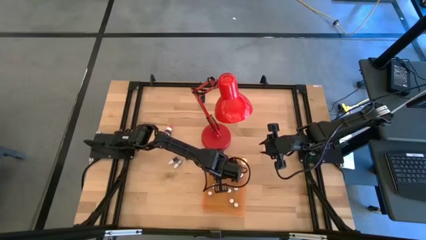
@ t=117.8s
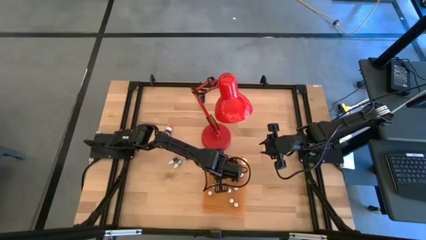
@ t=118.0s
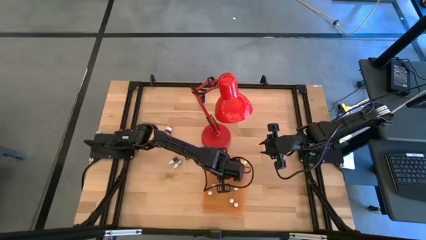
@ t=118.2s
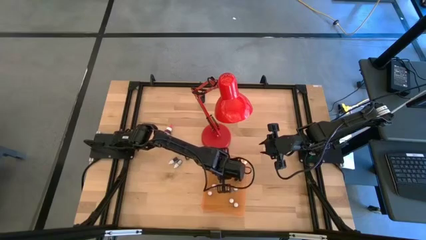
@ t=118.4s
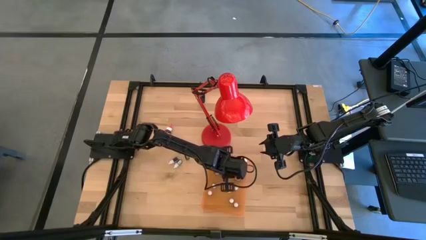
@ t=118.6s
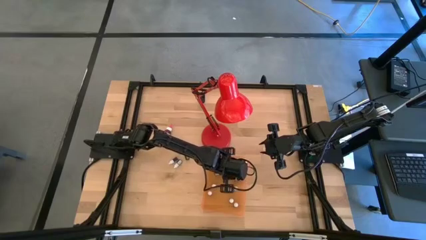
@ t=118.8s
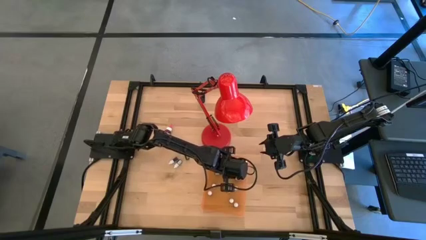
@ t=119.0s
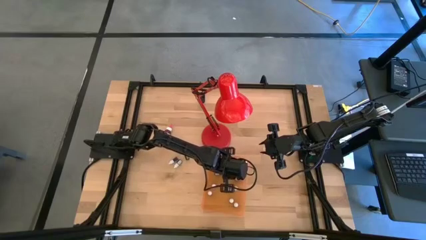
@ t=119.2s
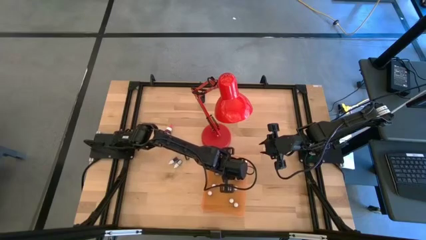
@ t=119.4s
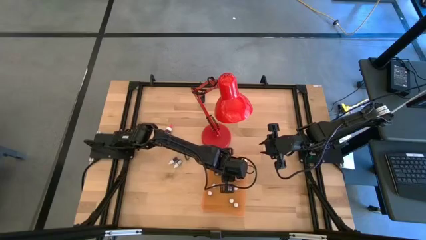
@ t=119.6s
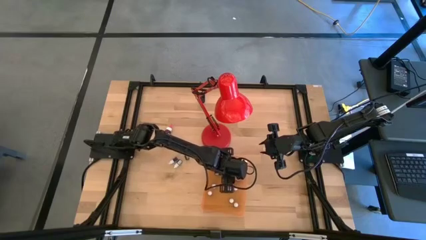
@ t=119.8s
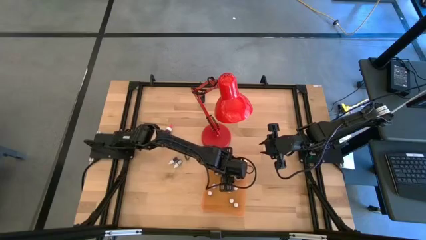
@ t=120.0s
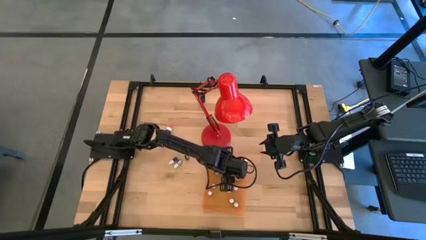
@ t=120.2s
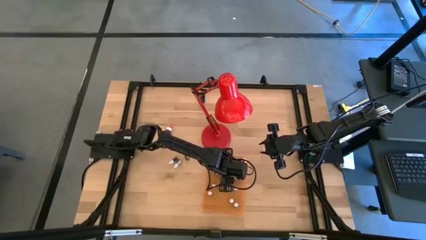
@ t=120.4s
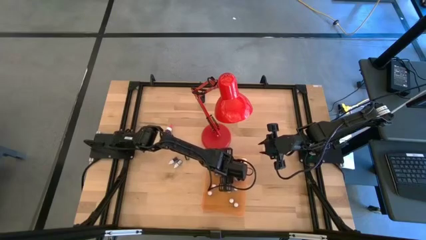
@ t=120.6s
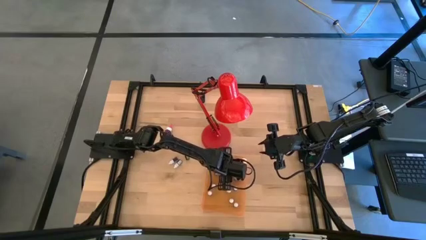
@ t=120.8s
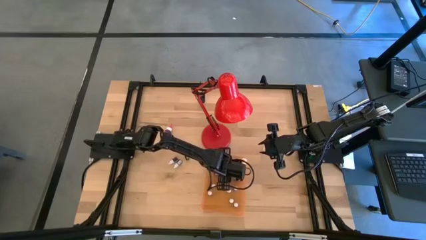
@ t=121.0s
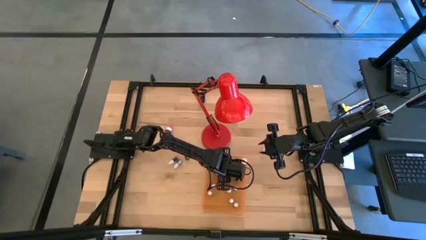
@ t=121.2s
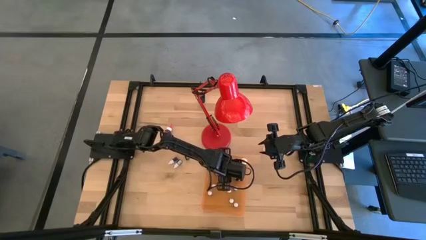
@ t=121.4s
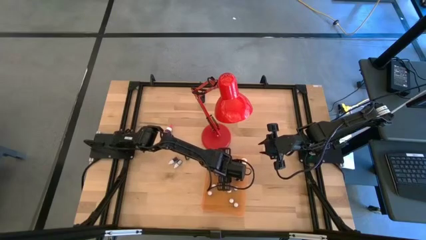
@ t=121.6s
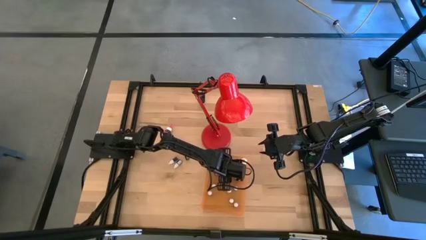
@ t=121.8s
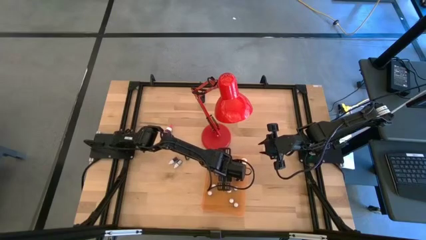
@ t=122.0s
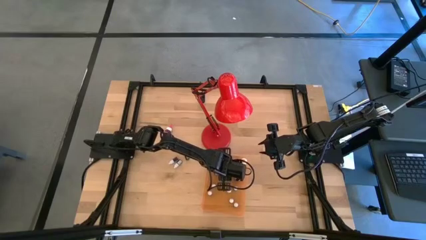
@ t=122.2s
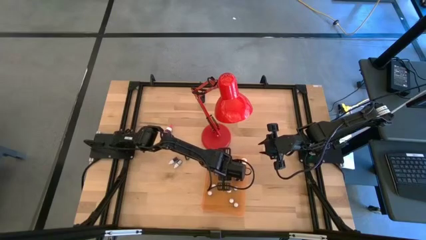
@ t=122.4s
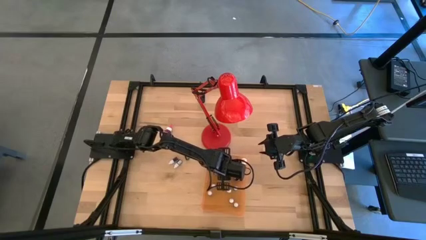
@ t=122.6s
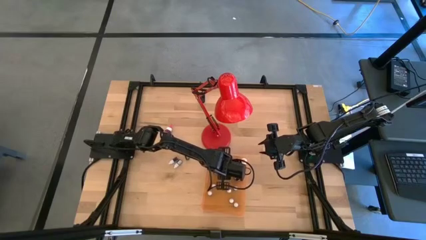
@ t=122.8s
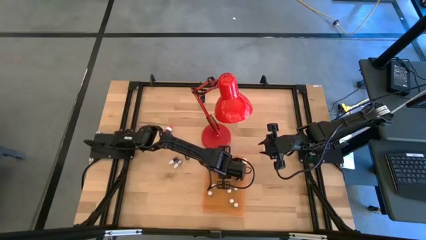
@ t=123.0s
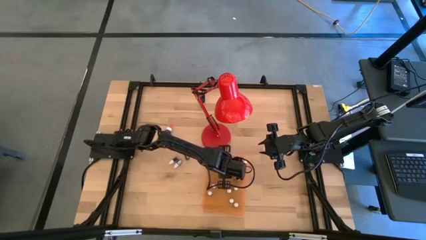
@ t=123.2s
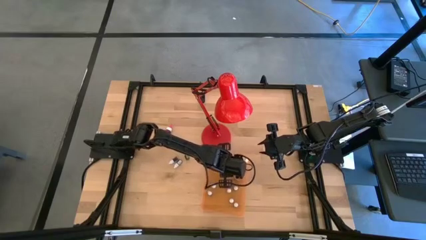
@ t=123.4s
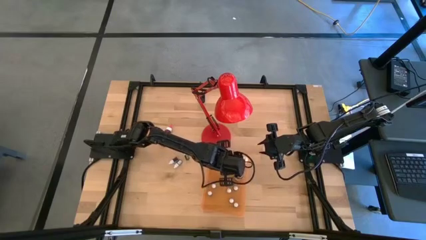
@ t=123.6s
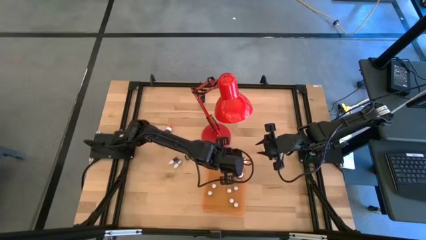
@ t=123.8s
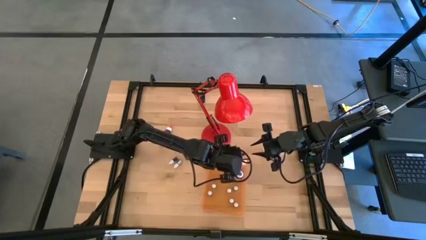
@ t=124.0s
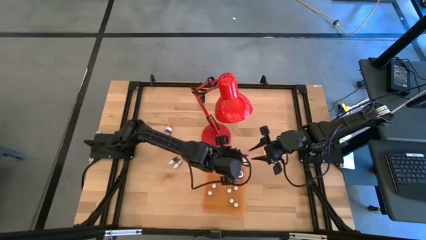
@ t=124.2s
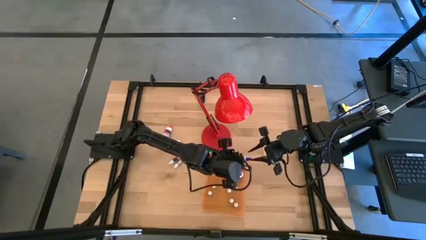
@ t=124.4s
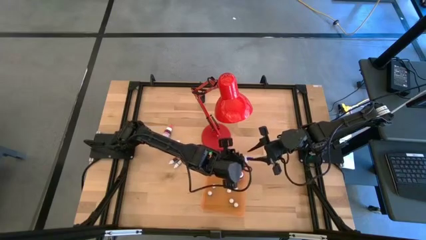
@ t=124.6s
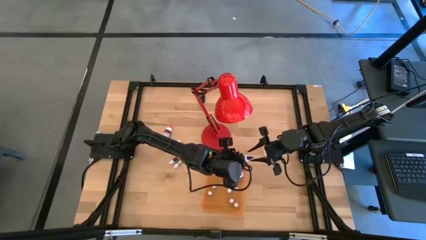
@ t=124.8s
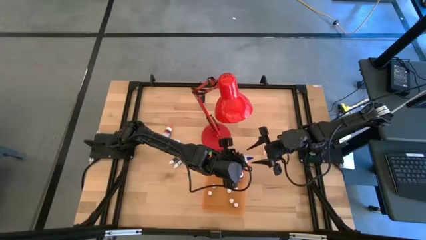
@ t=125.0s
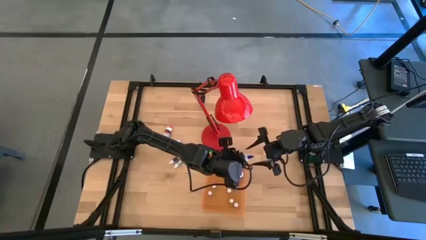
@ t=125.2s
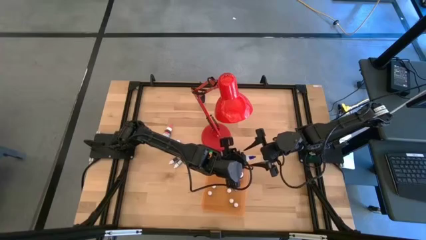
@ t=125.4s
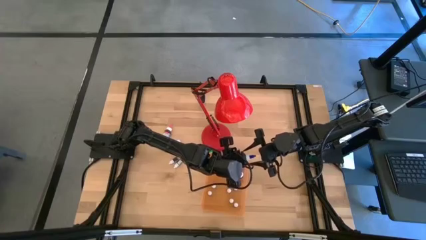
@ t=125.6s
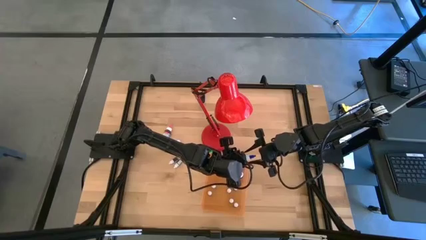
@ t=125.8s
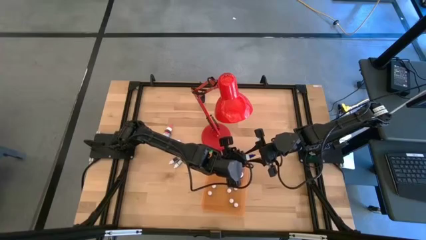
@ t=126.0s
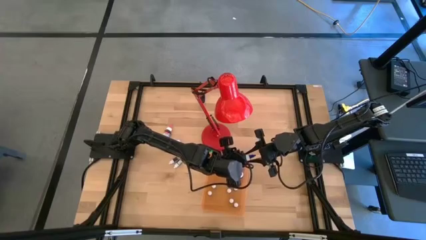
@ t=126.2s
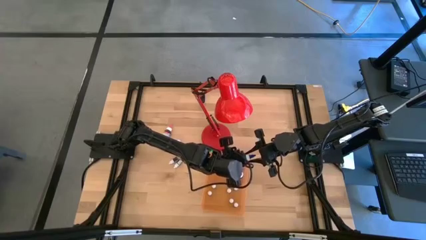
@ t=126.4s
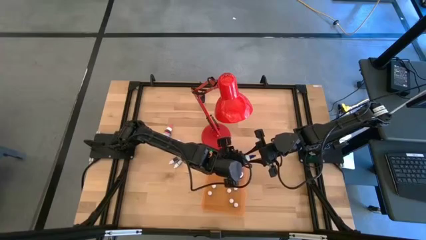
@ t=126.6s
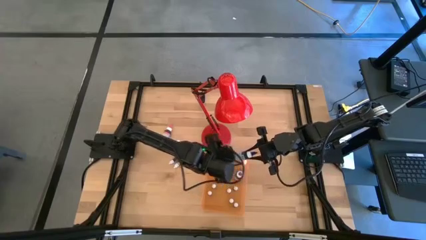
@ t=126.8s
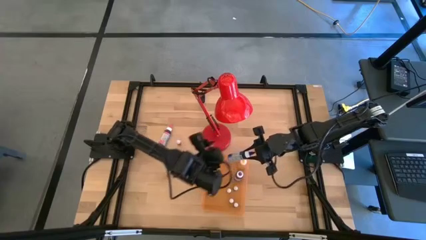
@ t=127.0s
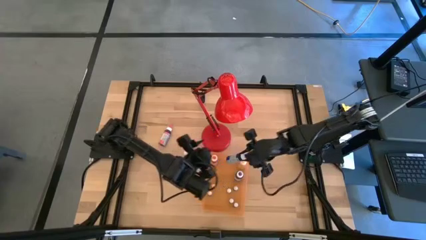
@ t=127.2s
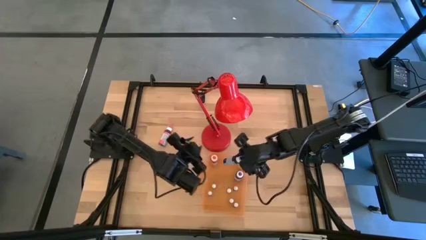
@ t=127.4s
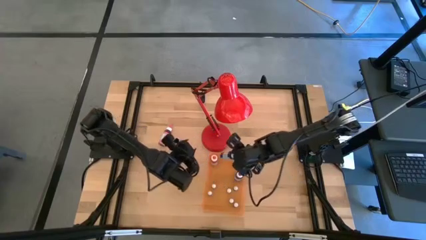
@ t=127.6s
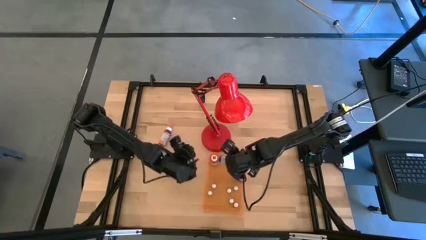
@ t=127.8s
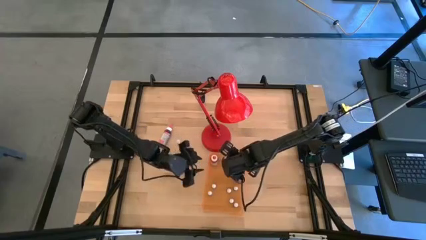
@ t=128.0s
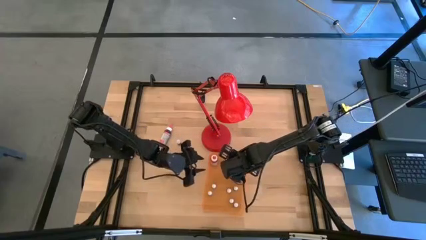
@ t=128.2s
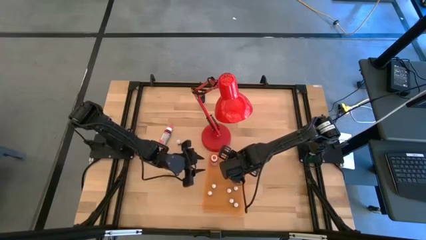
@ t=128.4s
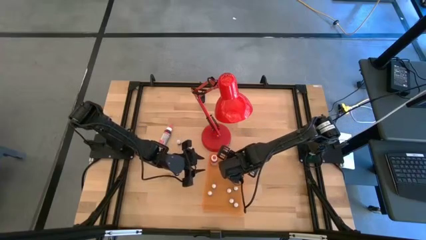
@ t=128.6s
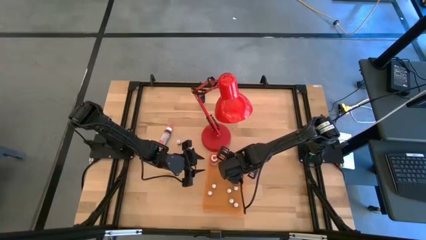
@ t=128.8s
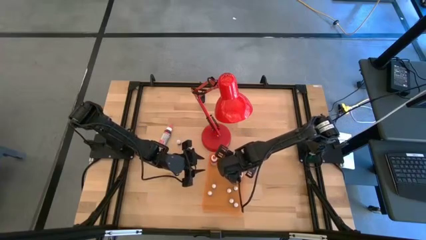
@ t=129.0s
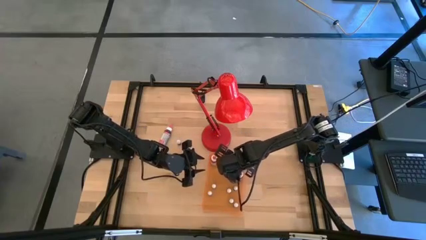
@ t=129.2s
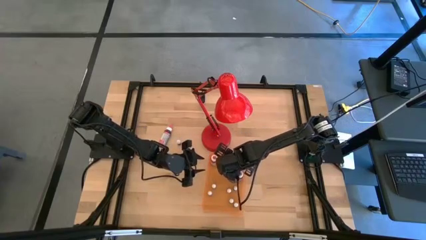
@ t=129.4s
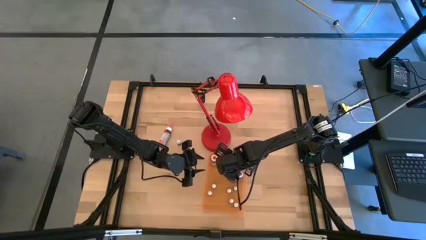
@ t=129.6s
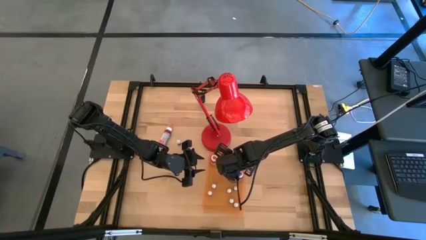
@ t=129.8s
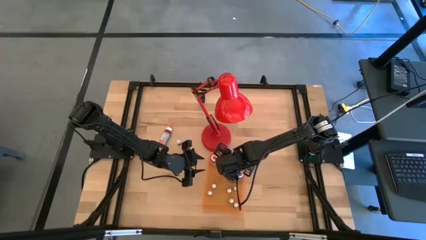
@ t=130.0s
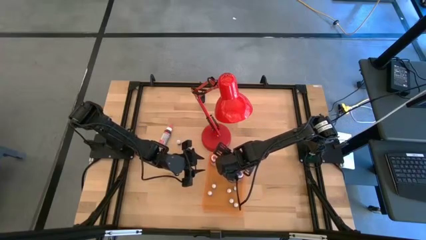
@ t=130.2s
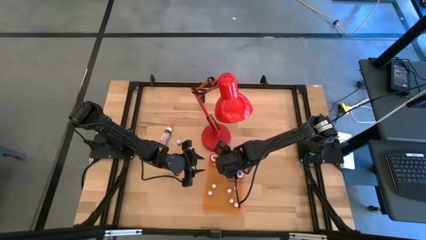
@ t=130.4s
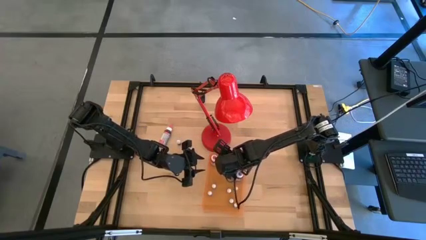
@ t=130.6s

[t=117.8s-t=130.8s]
Task: Pick & Place food coloring
Adjust the large blue food coloring bottle in the orange bin

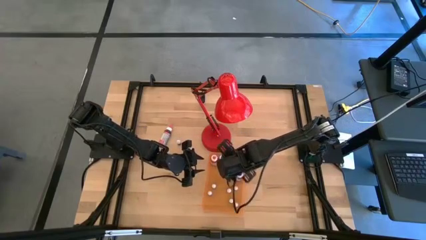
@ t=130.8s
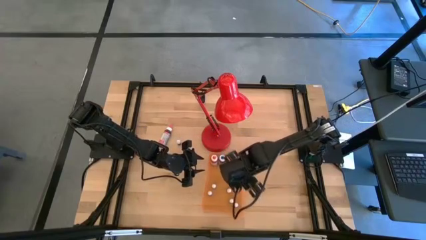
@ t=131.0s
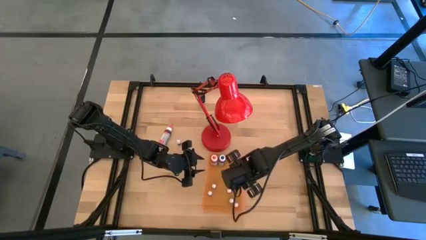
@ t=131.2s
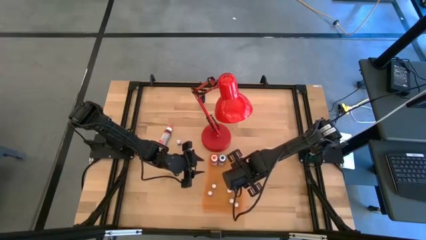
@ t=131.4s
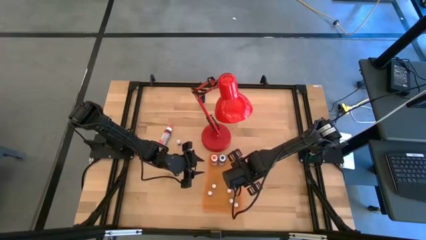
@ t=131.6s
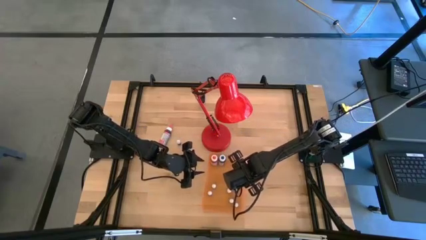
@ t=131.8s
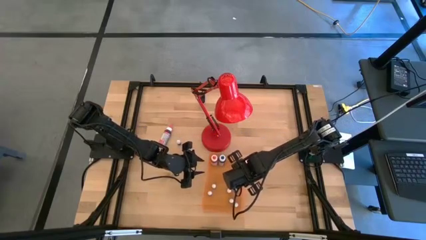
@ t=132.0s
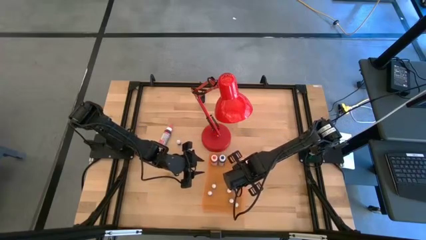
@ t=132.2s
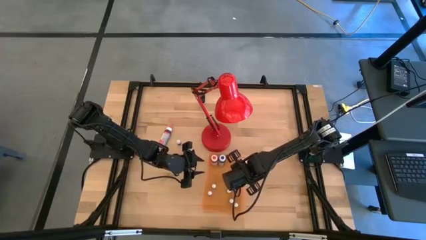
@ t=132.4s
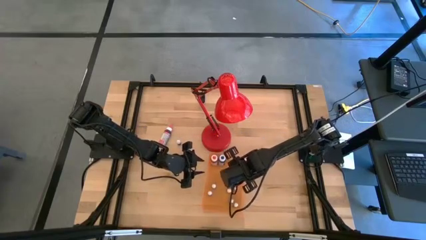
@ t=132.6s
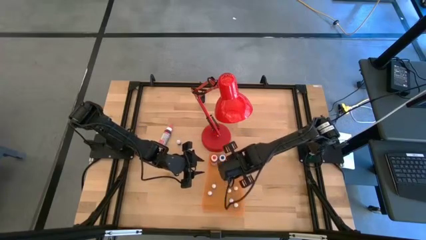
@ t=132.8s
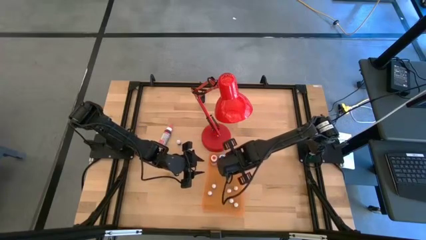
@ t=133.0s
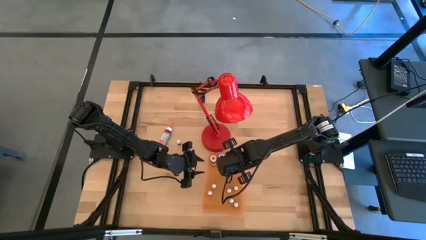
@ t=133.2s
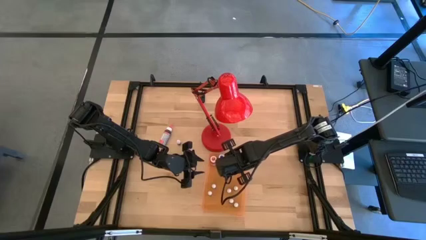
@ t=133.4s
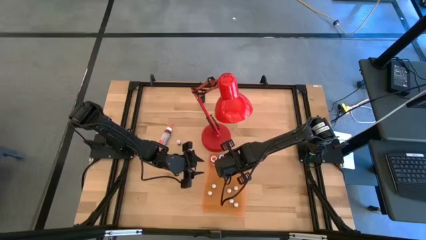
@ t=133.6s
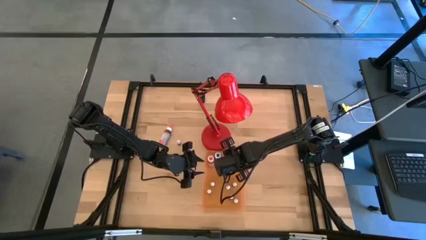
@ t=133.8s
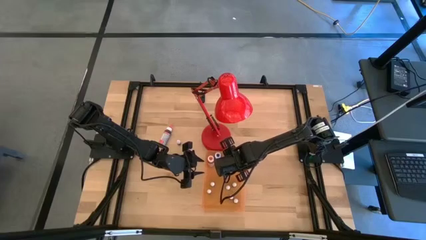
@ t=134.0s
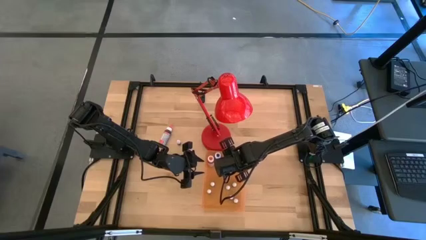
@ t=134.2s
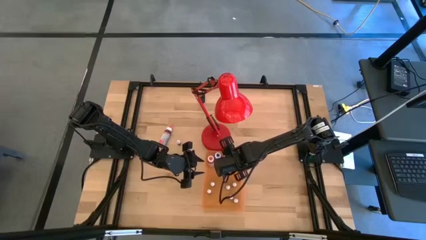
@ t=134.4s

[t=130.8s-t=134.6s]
Adjust the violet food coloring bottle in the orange bin
